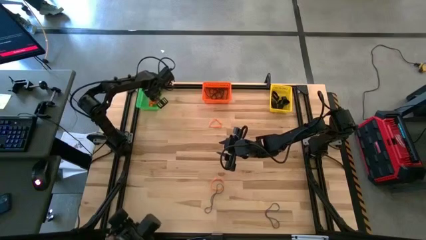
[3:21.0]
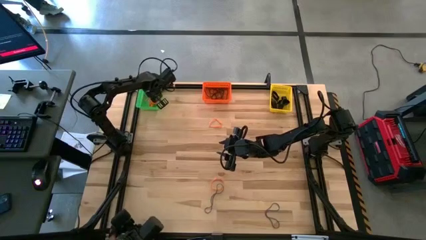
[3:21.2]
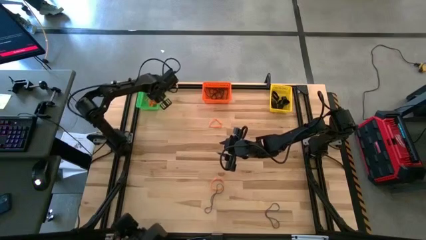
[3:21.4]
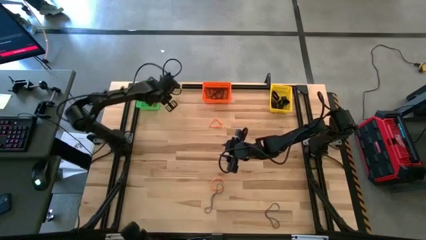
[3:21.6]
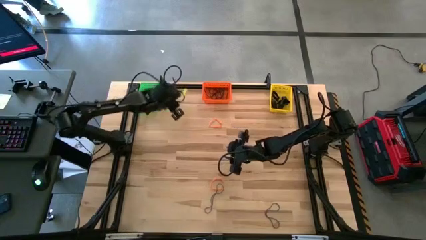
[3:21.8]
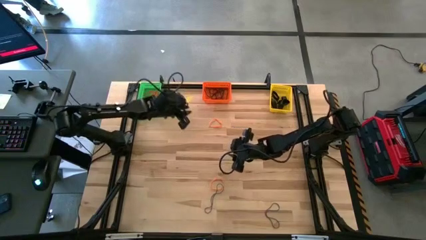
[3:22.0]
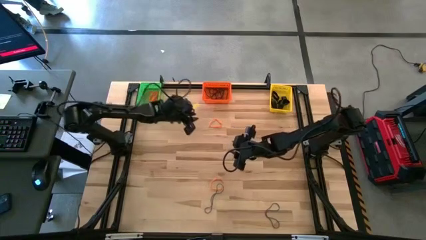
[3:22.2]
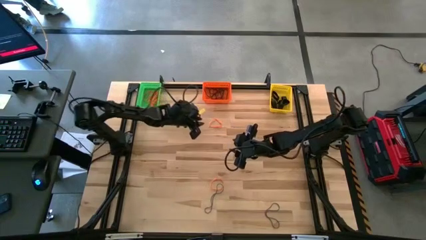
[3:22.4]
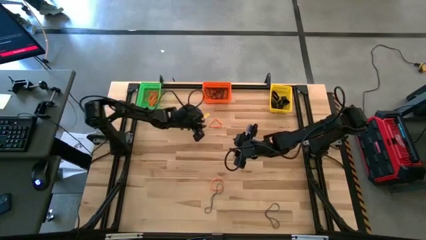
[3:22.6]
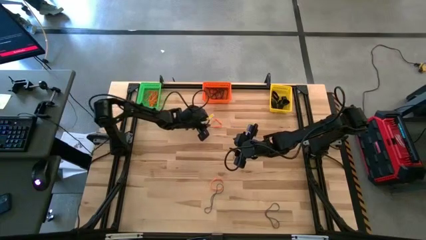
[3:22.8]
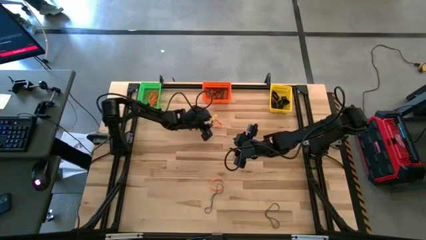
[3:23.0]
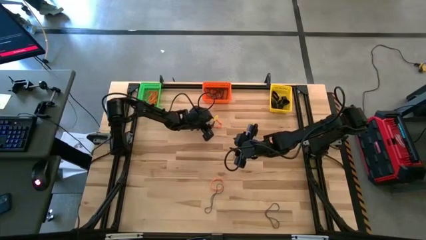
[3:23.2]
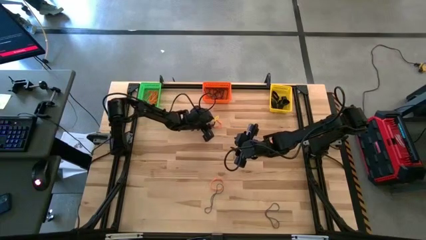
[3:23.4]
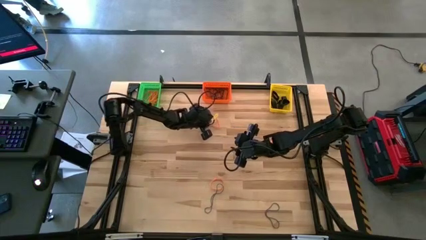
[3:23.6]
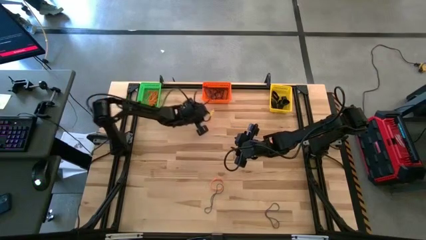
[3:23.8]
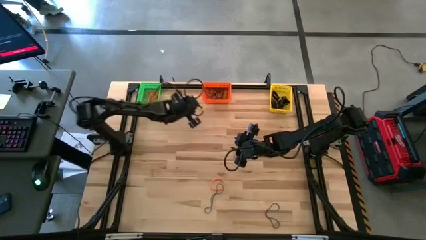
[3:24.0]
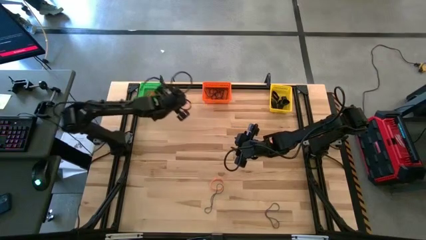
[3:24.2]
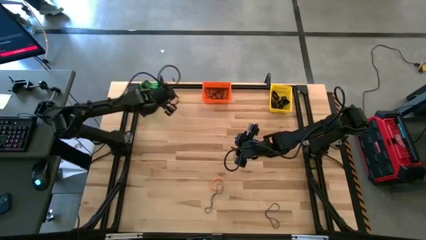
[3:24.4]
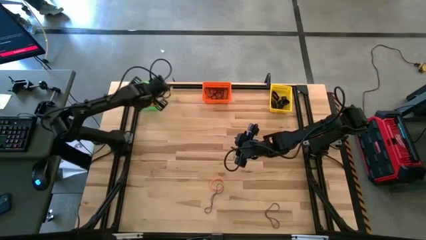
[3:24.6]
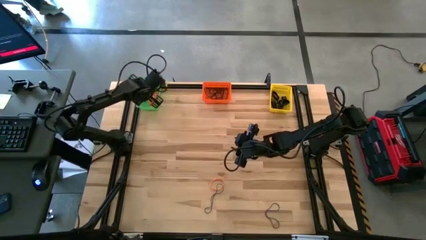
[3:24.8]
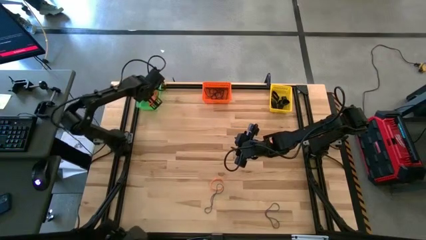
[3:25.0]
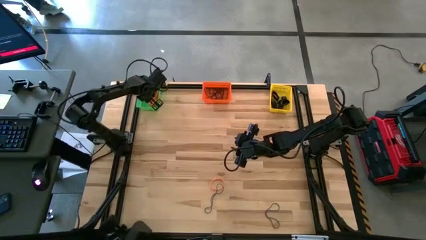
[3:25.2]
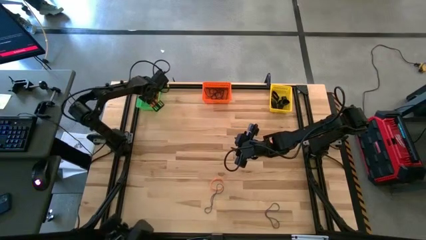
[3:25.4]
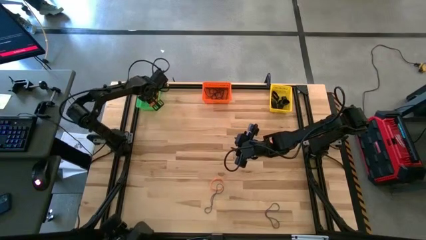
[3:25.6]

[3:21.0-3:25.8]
Task: Sort rubber bands into baskets
Put the top orange rubber band into the green bin

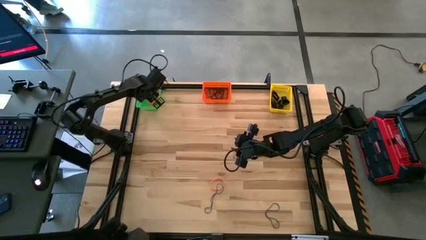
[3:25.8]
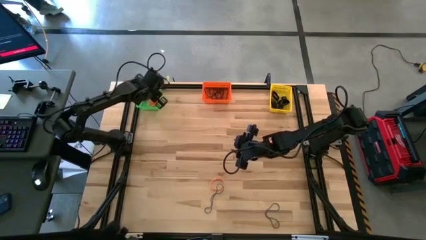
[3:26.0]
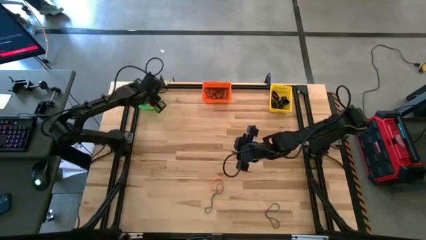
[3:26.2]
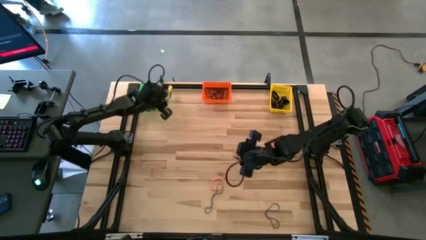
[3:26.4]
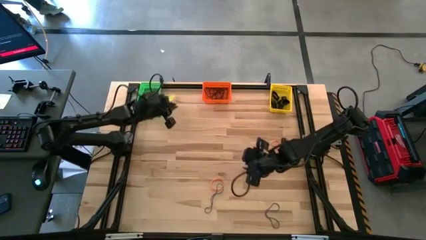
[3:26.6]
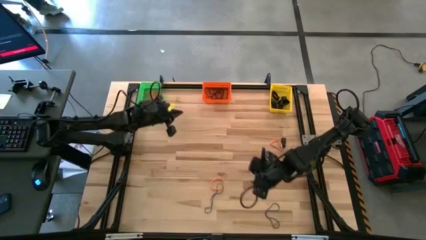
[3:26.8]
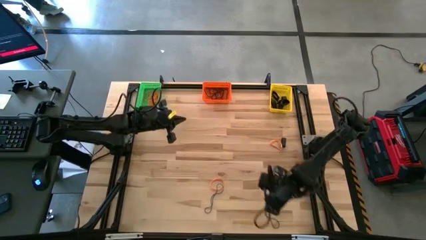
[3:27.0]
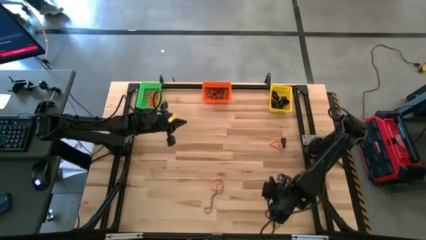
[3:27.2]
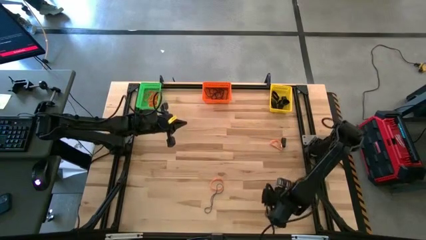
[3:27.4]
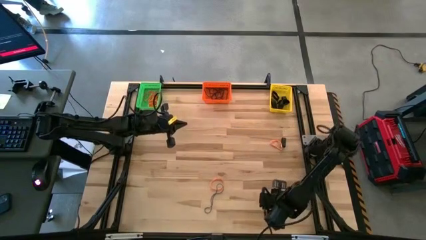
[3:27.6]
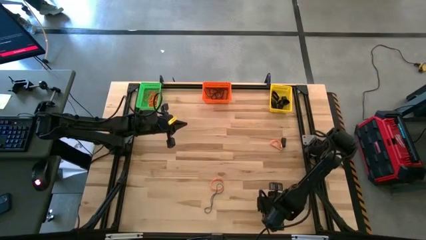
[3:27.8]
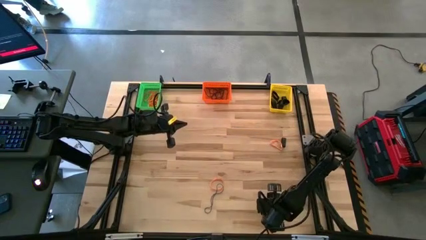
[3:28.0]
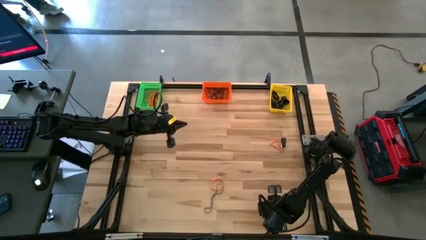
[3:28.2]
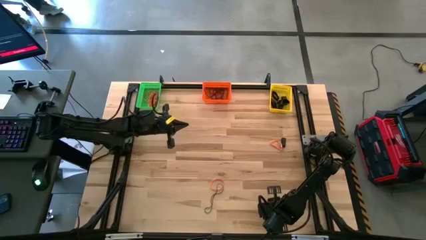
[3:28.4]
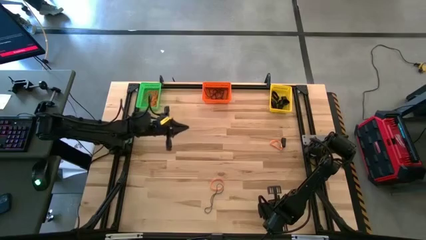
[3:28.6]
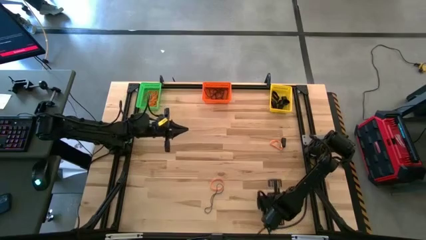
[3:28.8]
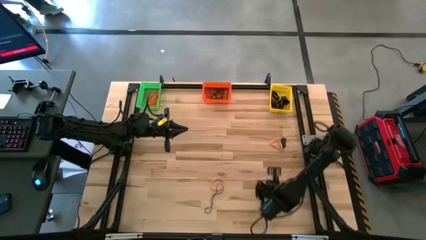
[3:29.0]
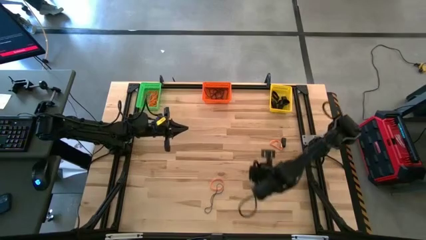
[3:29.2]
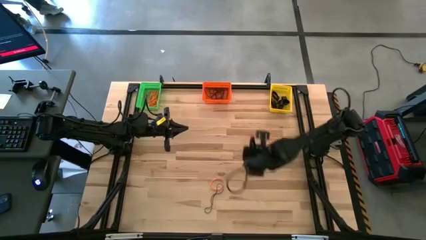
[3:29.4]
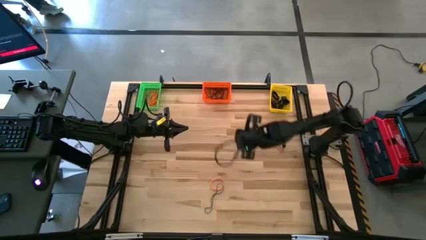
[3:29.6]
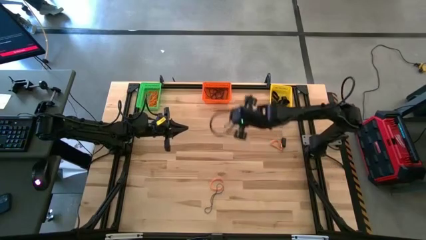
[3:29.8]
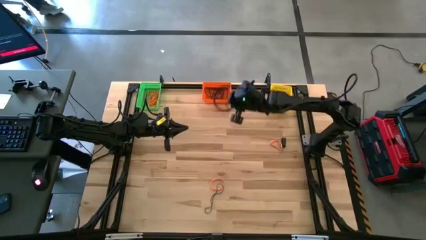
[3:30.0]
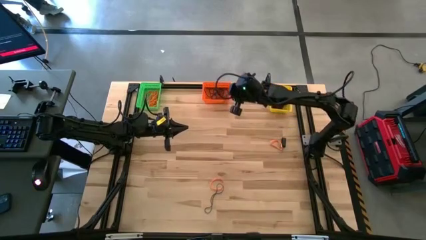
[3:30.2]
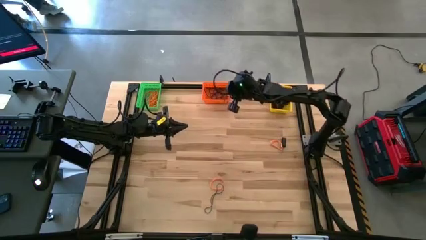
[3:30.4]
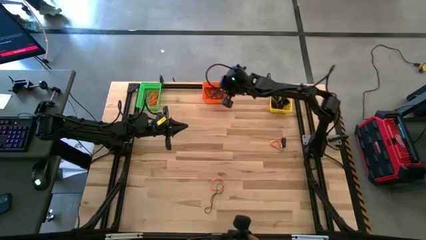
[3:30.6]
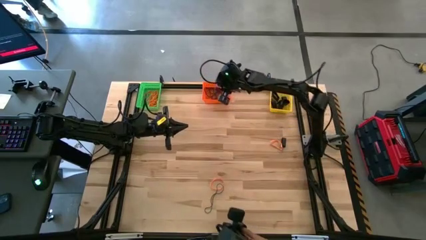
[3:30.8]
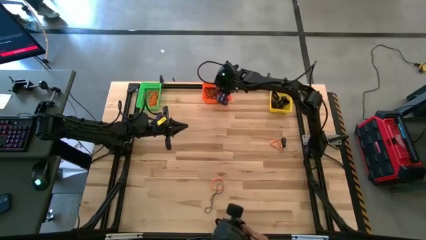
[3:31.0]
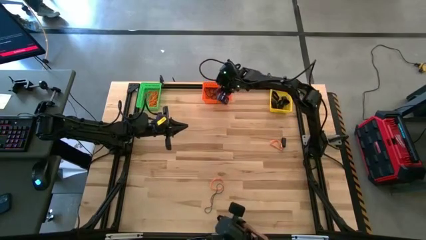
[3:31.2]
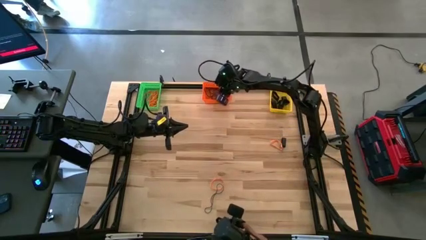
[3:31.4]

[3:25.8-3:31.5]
Put the right blue rubber band into the orange bin

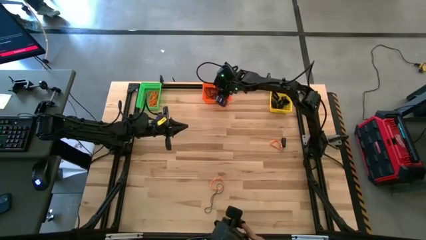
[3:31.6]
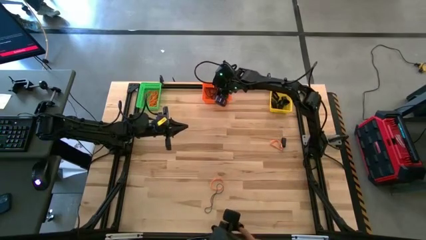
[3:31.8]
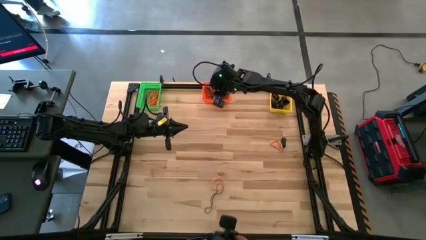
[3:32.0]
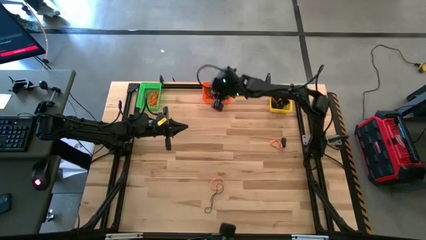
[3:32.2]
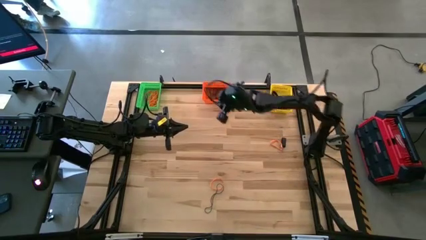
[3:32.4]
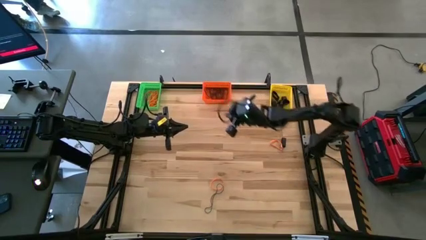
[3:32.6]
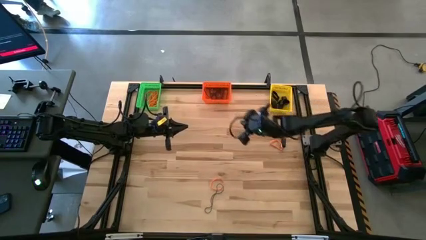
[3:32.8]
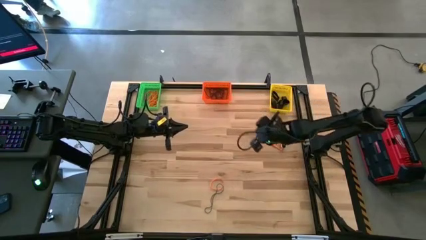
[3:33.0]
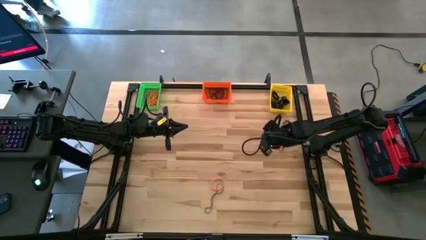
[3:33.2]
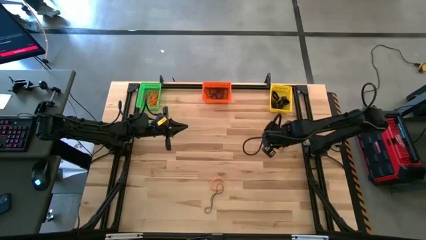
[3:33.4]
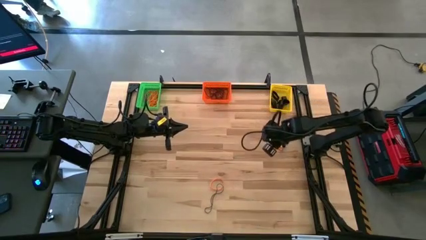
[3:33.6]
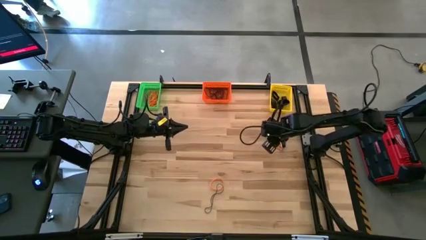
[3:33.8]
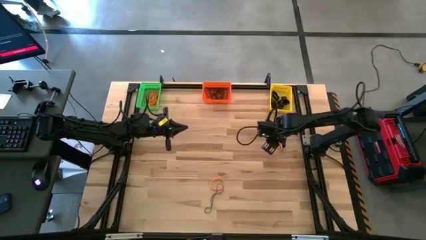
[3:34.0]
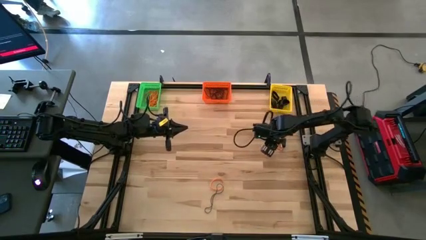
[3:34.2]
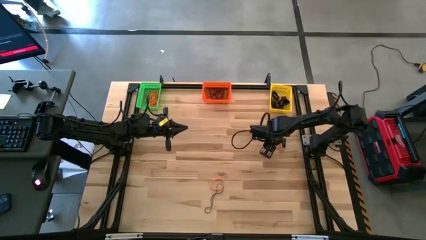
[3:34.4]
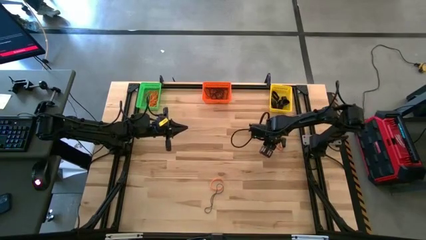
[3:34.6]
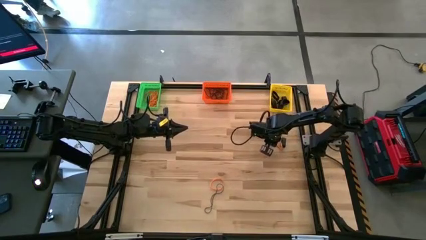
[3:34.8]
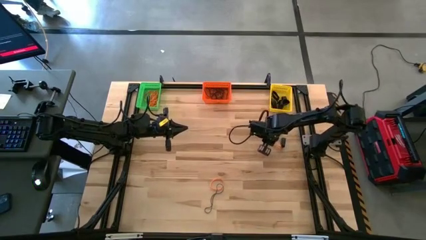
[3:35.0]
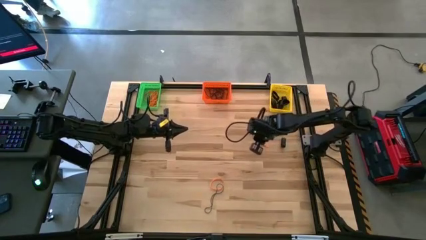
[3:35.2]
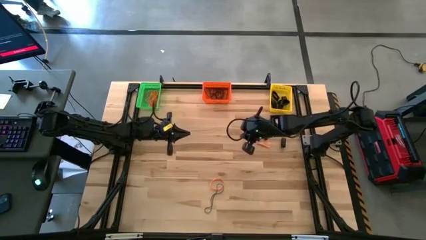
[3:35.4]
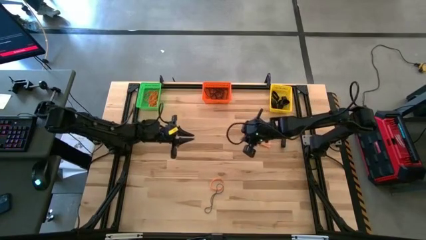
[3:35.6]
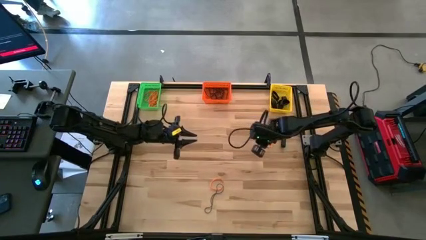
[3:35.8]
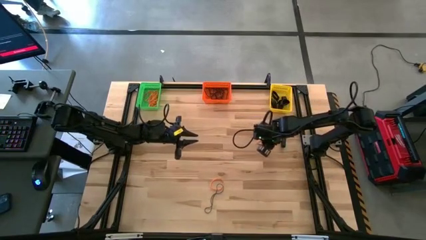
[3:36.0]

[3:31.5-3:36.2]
Put the top orange rubber band into the green bin
